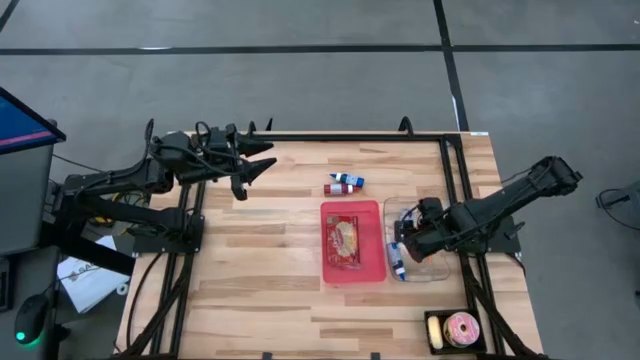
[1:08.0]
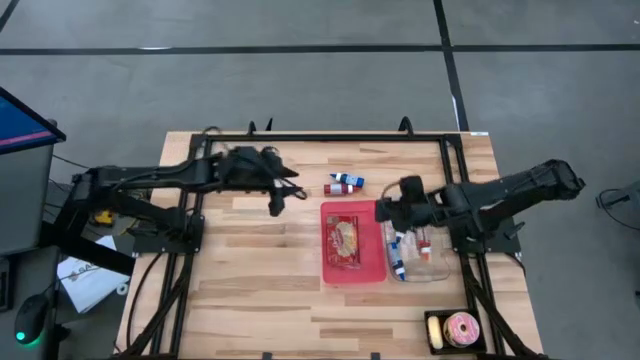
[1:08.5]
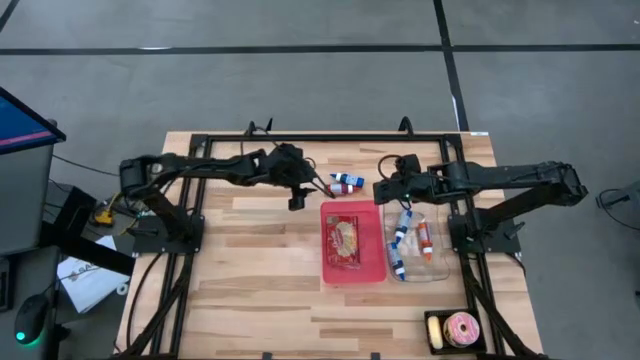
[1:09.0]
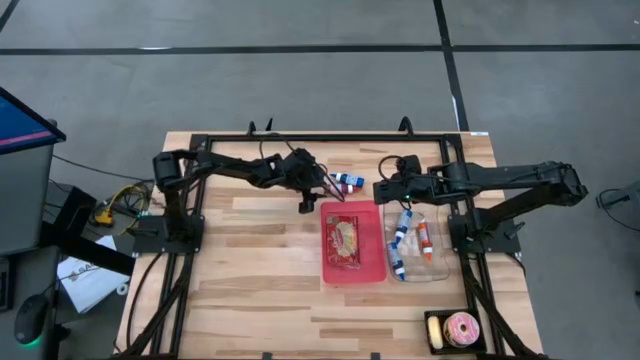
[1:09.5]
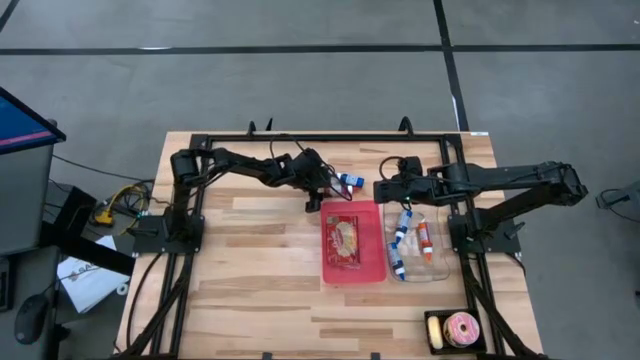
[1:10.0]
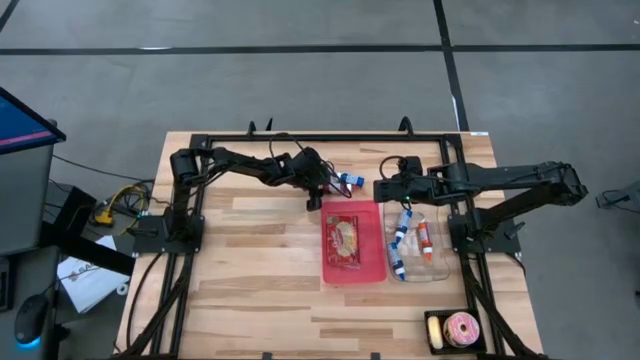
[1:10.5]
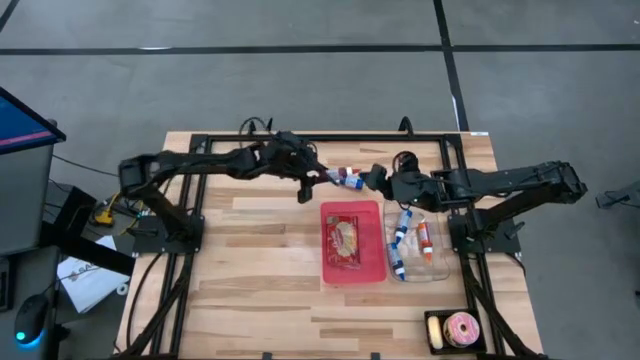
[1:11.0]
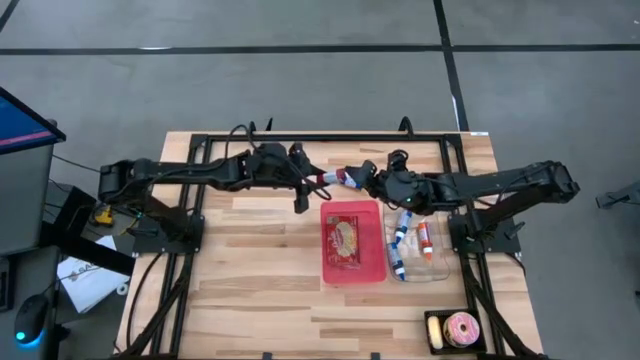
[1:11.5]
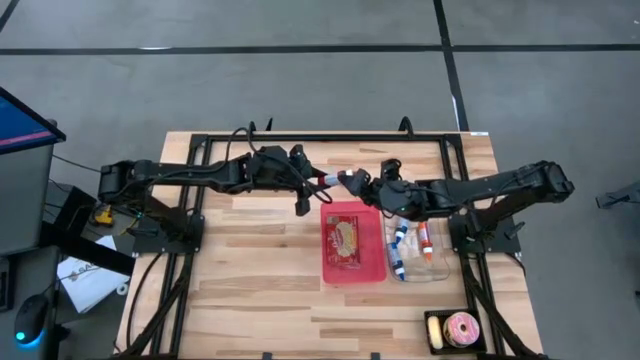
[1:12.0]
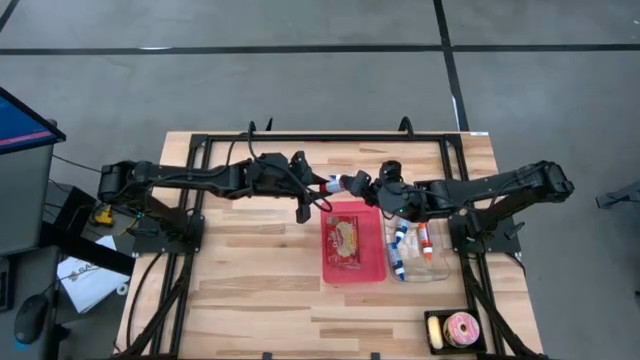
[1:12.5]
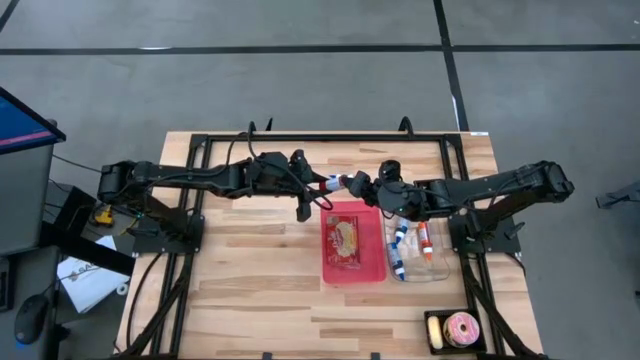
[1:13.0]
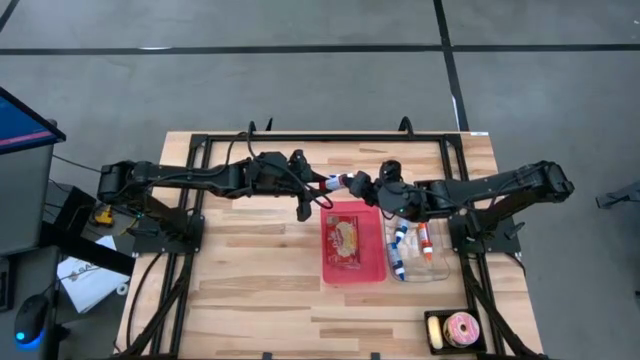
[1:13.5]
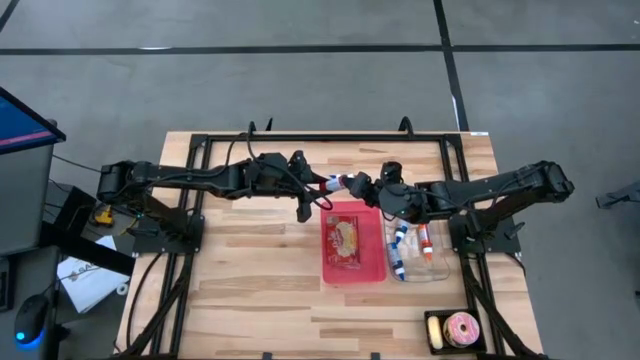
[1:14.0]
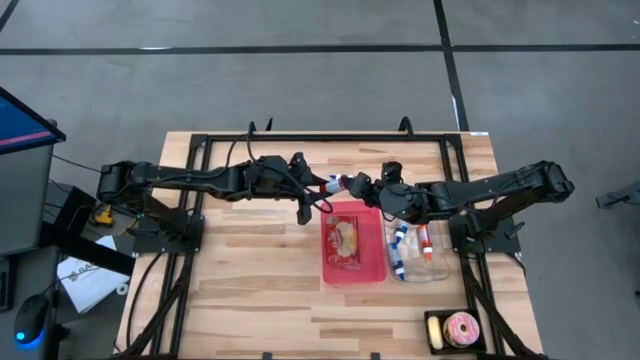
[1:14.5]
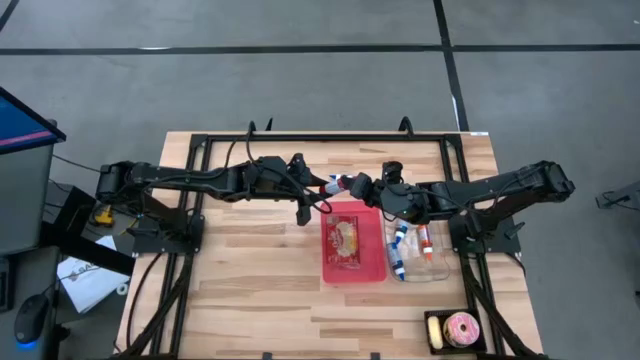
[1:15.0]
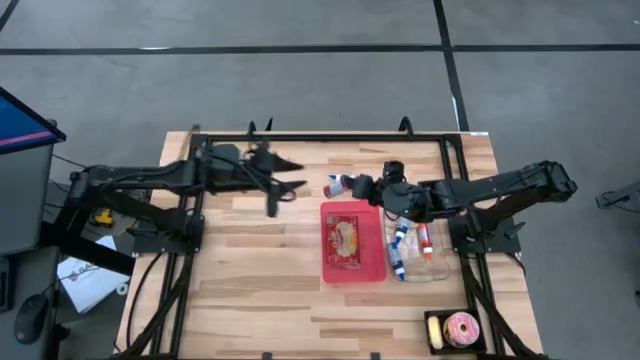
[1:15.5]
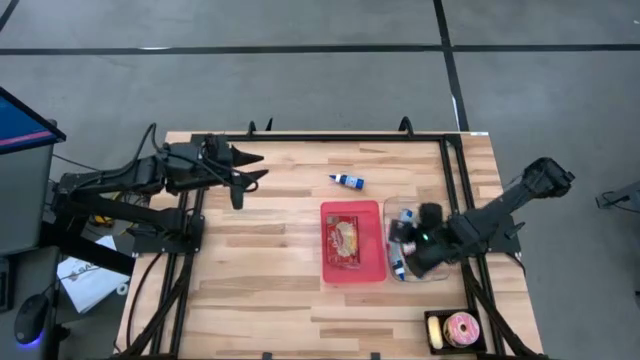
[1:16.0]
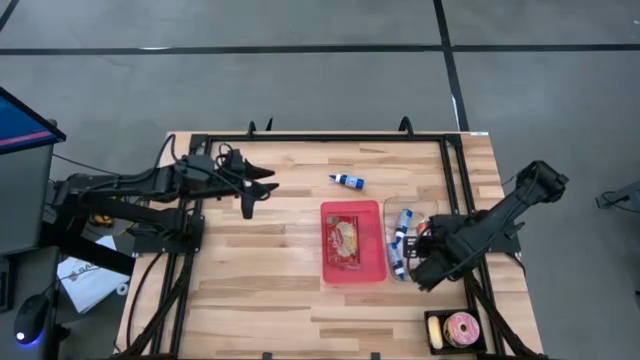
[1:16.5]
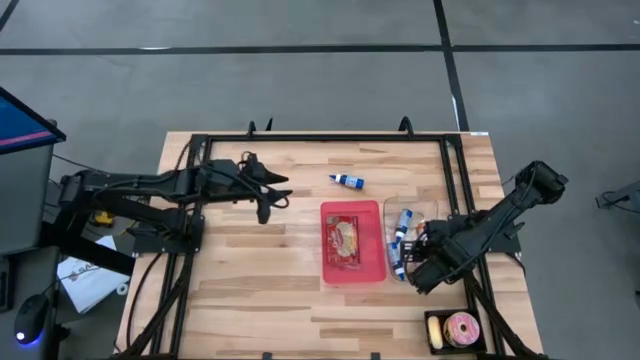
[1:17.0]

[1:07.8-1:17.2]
Put the red food coloring bottle into the transparent bin

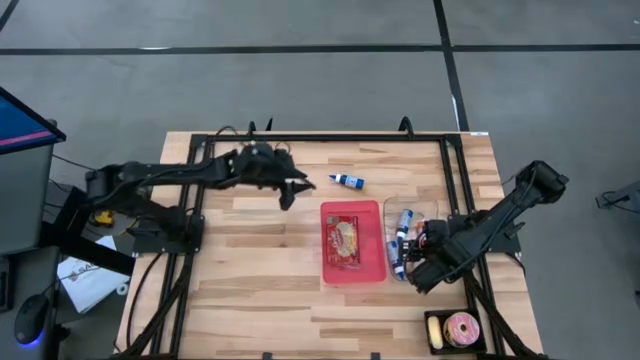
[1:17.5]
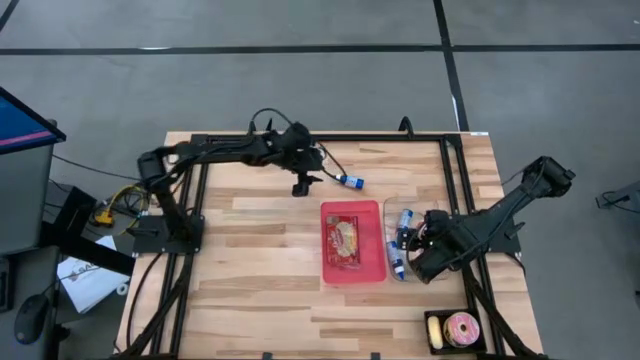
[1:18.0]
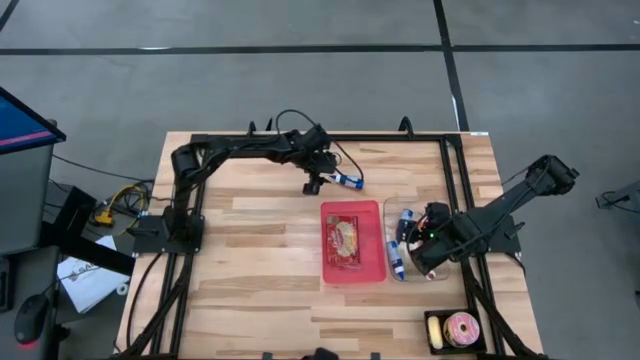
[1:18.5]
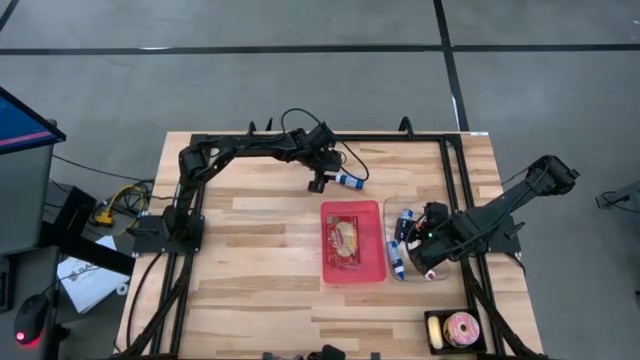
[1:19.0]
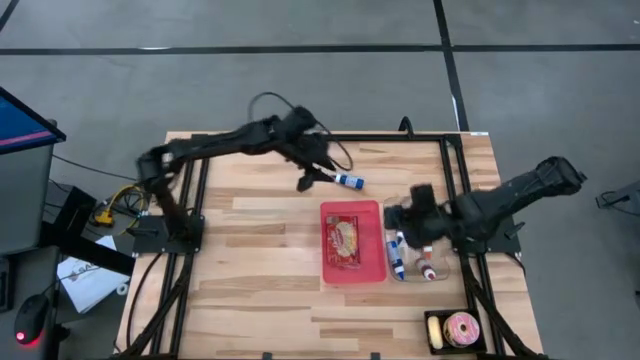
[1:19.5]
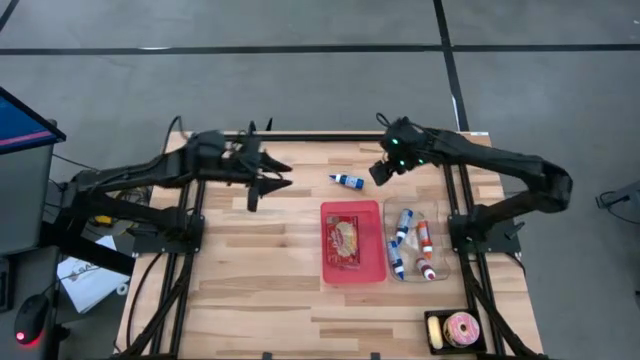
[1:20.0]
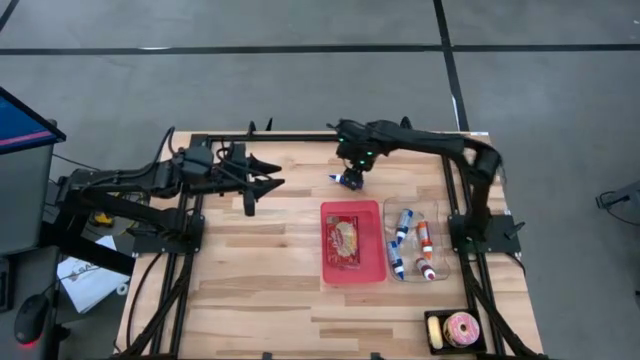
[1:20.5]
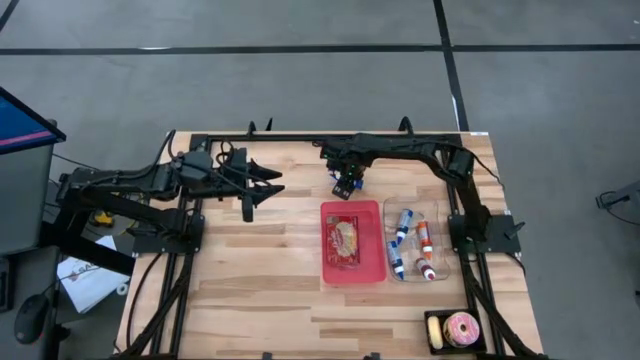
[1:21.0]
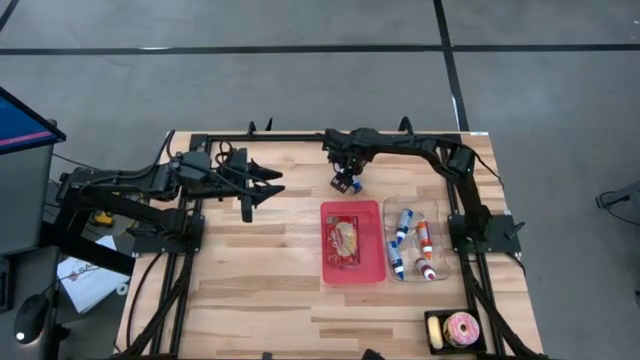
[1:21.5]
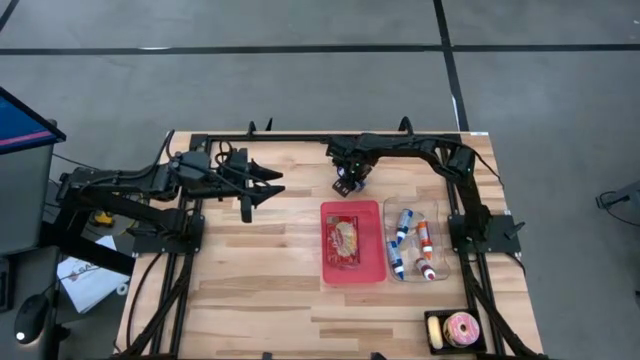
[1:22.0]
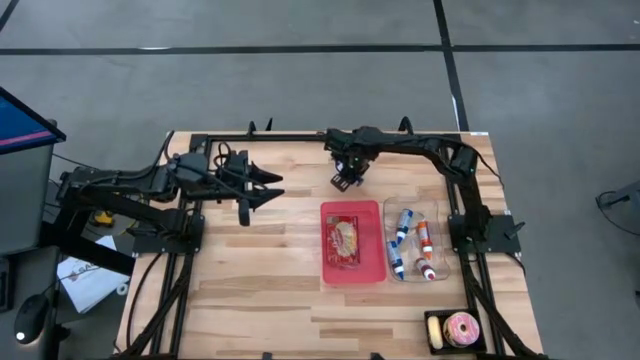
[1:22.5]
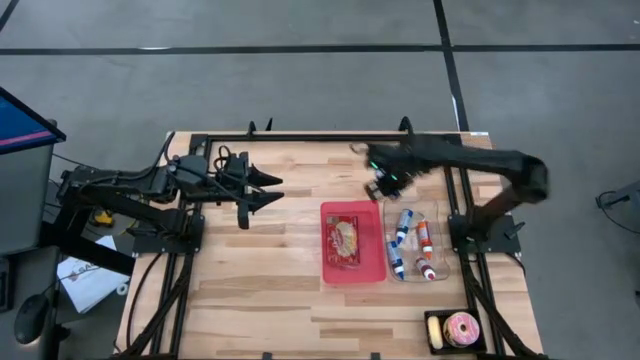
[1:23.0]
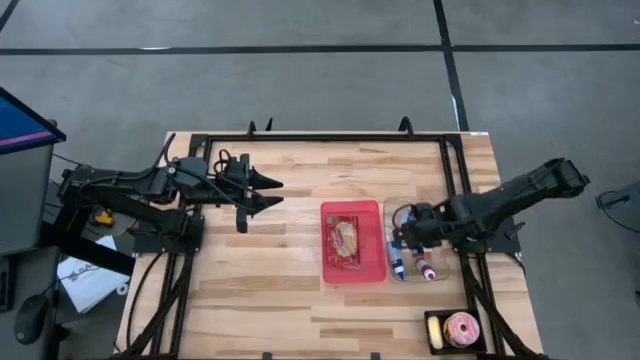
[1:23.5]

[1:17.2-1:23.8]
Put the blue food coloring bottle into the transparent bin

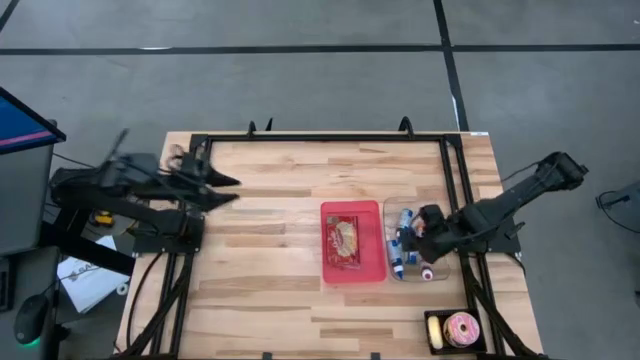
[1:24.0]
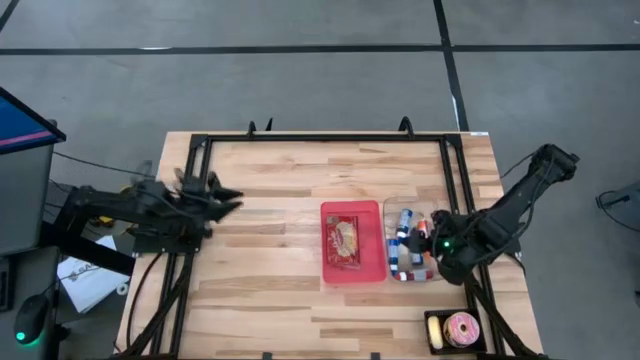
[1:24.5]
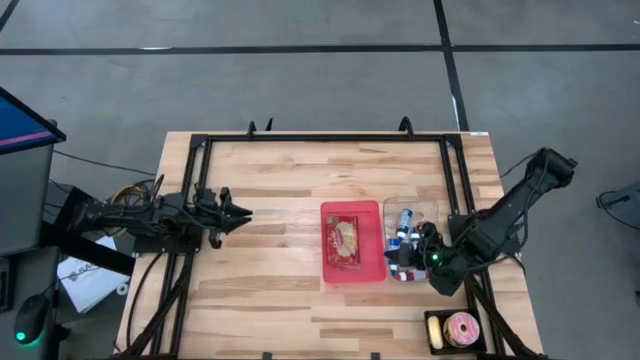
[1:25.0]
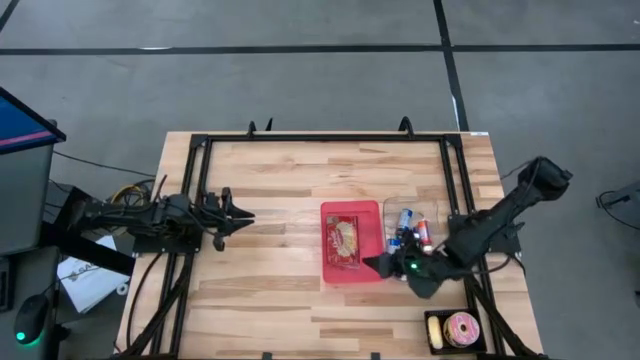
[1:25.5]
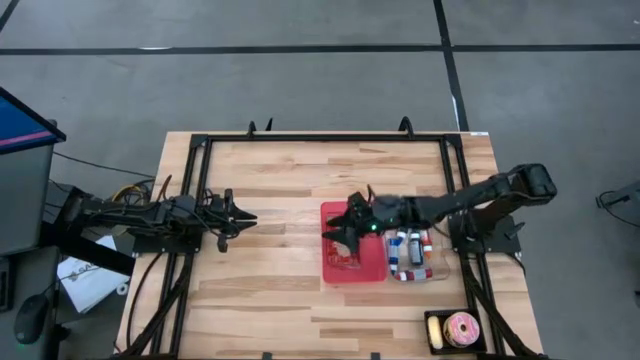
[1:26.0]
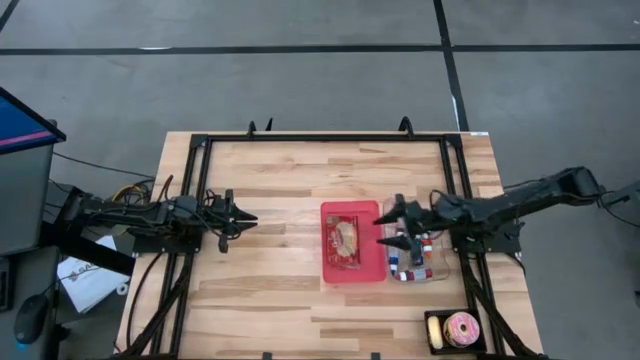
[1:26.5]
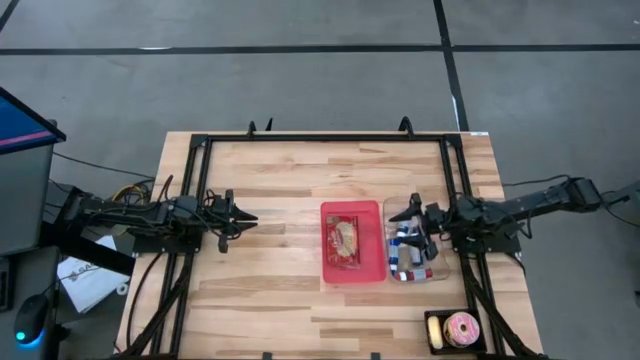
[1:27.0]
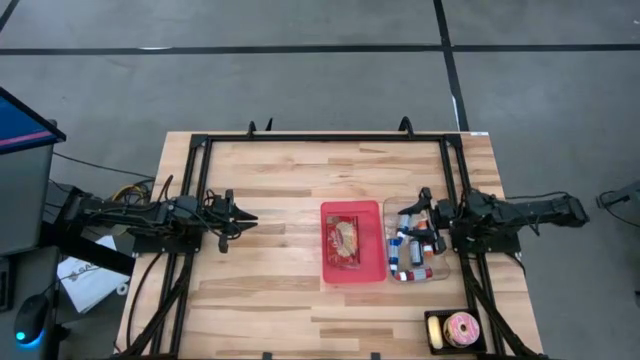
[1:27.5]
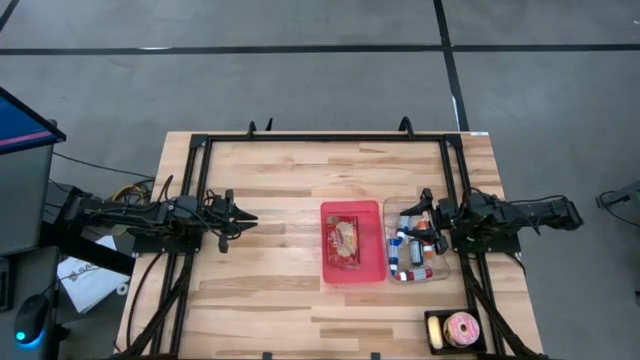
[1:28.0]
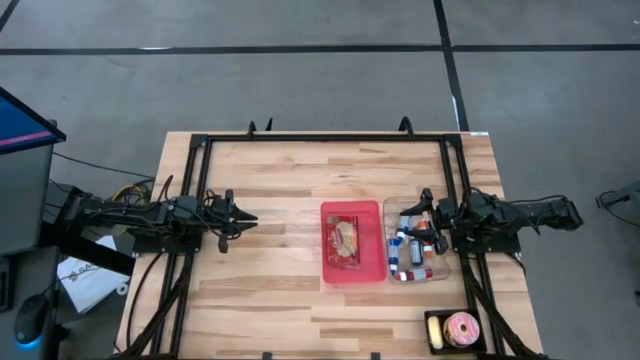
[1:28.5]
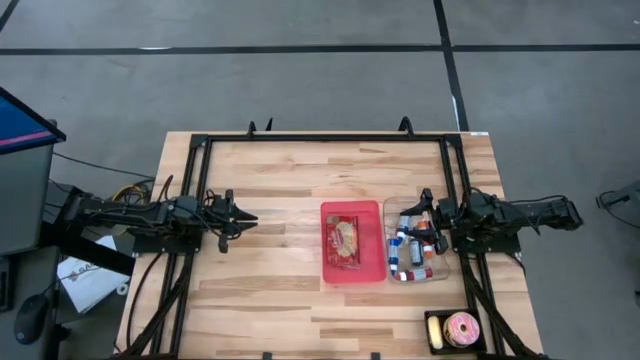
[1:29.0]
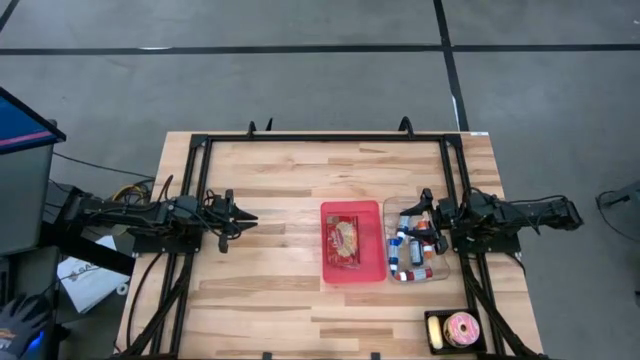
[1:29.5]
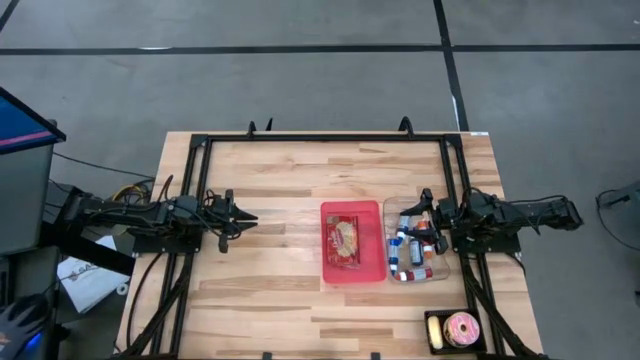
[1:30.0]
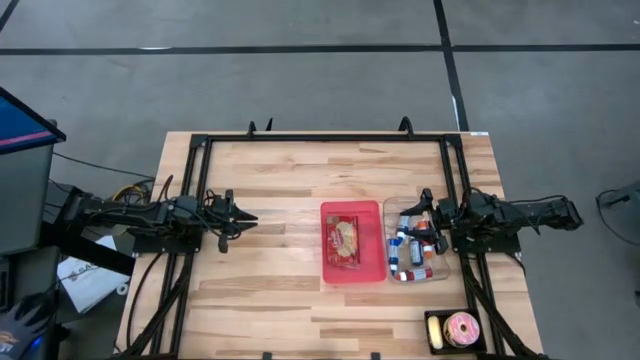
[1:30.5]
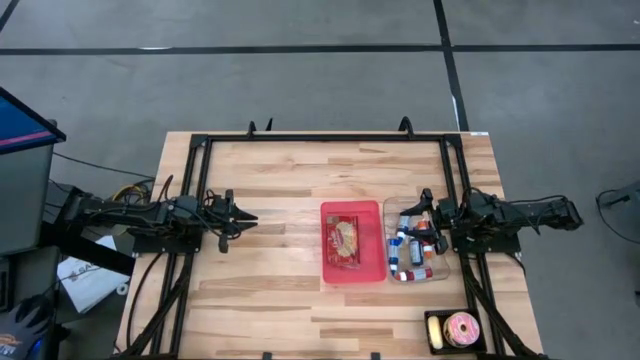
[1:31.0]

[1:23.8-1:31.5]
Return to Home Position
